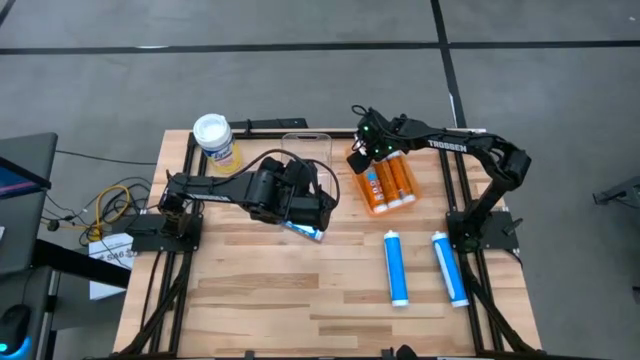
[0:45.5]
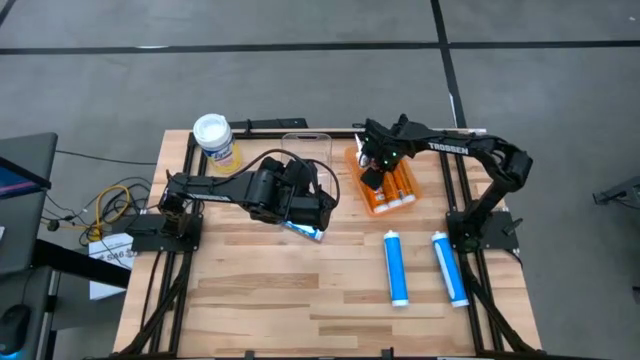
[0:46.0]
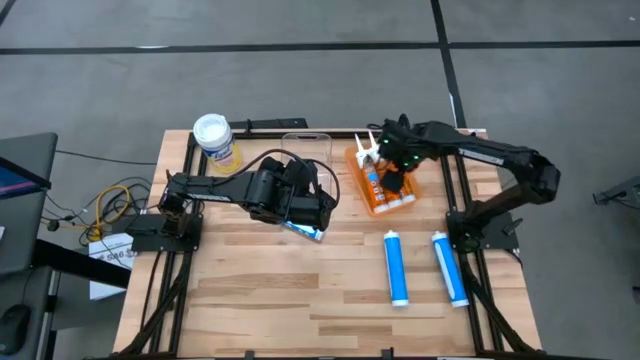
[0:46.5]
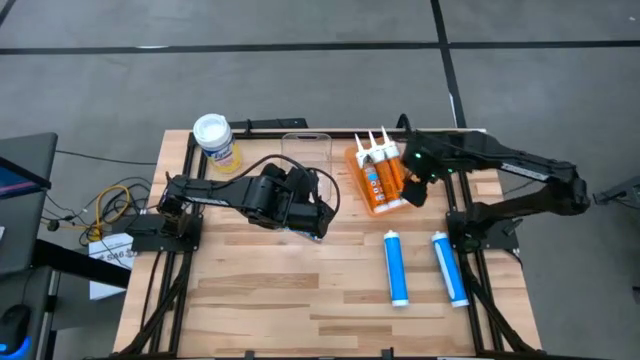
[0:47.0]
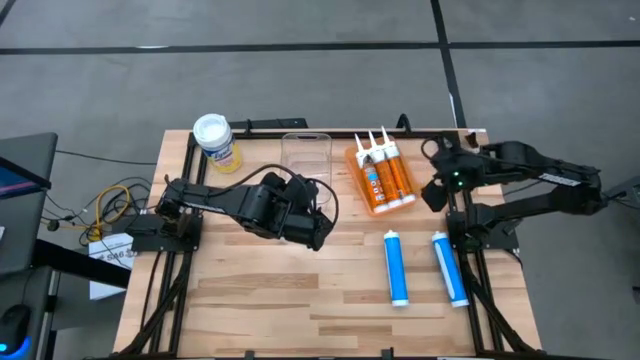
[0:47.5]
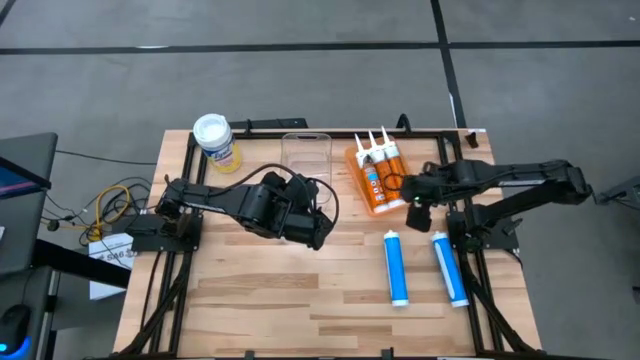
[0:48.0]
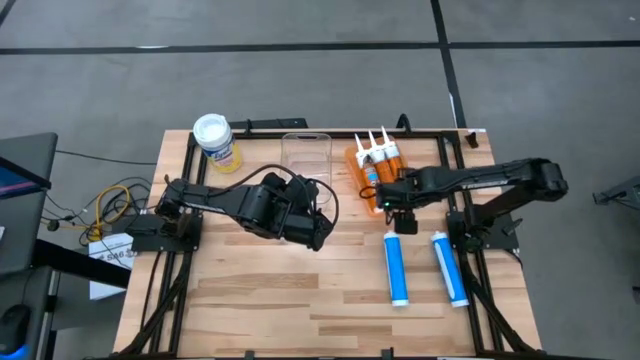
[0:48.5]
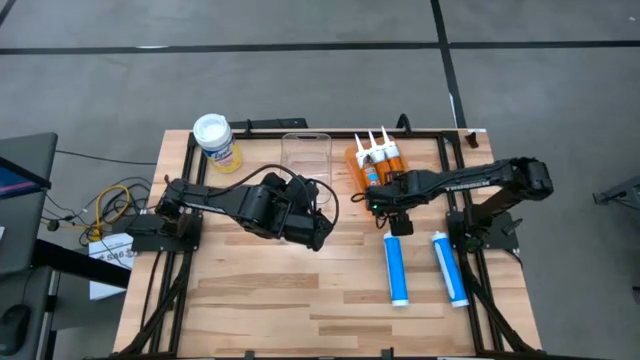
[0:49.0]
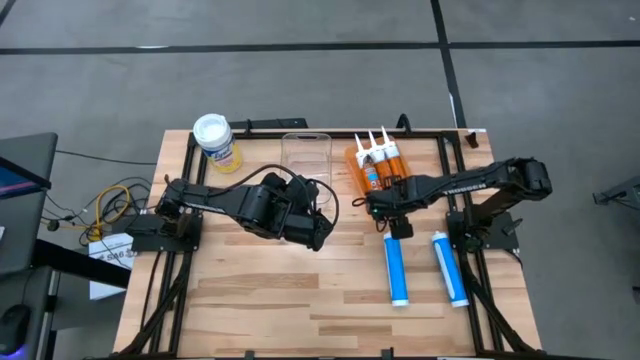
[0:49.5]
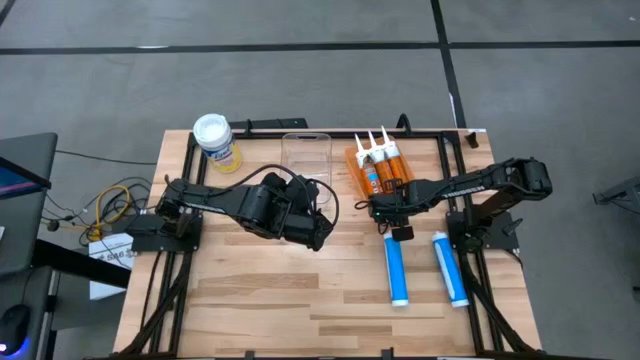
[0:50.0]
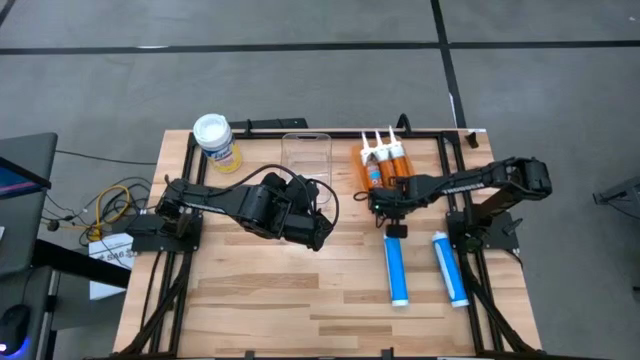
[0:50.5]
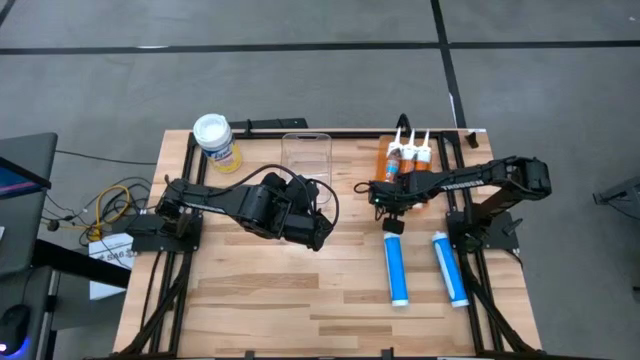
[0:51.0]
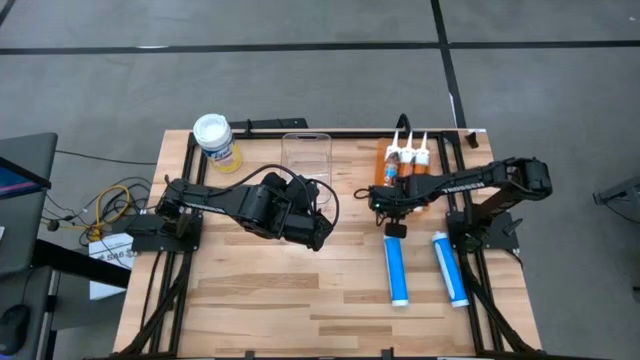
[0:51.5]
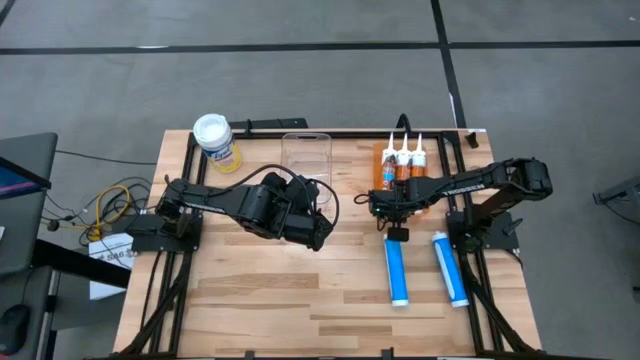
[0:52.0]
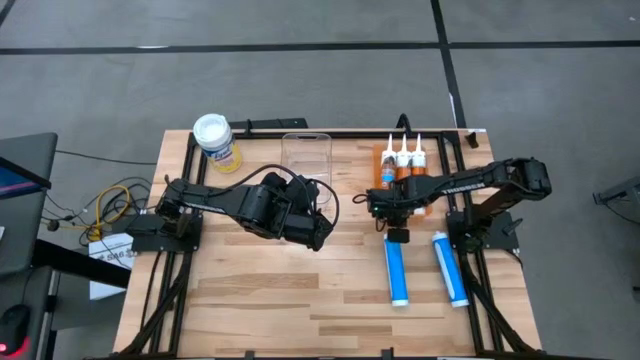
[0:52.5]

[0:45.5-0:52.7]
Task: Pick & place silicon tubes, Sealant and Lysol wipes
Adjust the orange bin

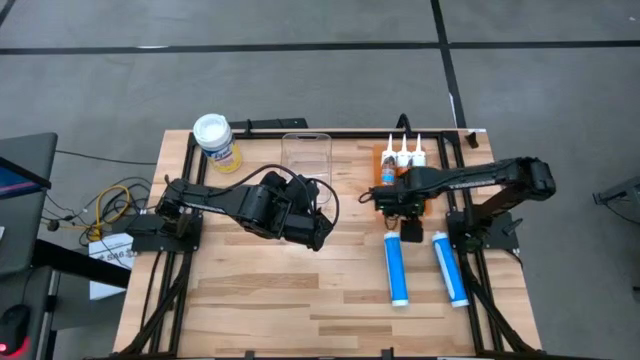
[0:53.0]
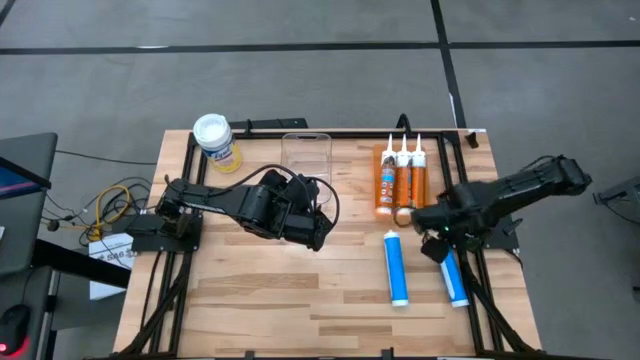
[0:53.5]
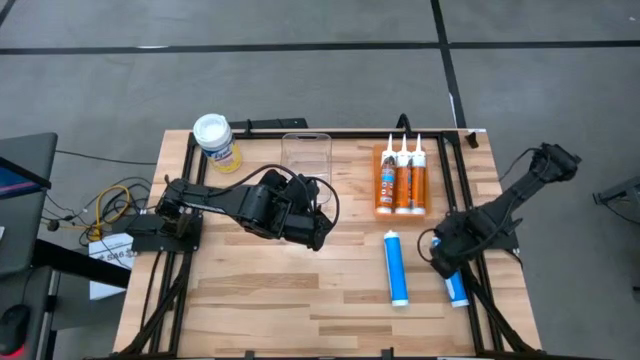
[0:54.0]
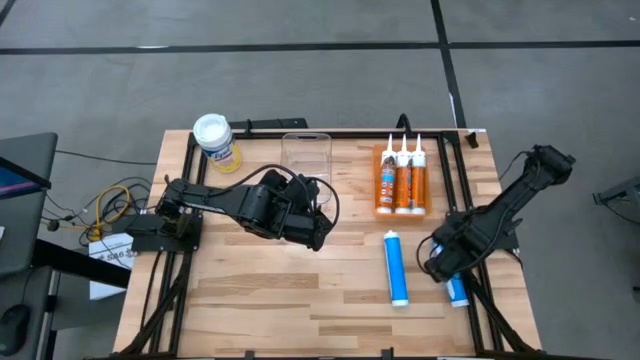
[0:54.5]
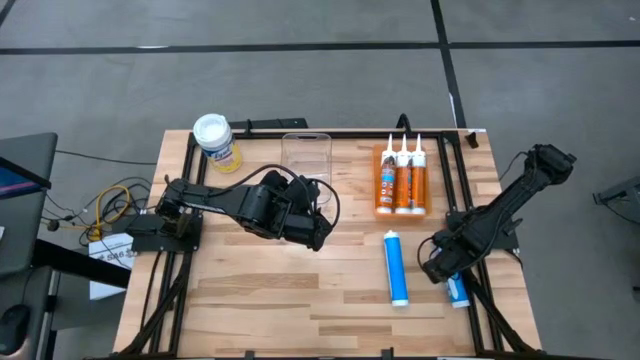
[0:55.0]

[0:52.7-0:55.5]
Put the right blue sealant into the transparent bin

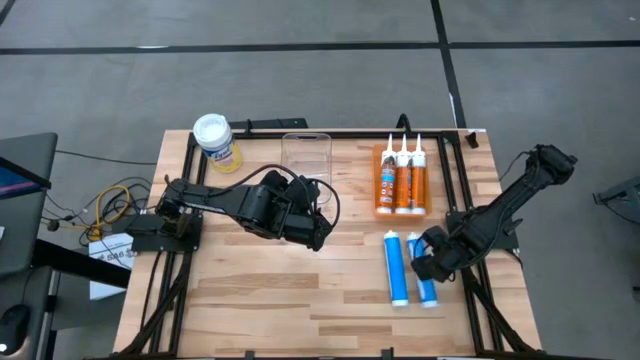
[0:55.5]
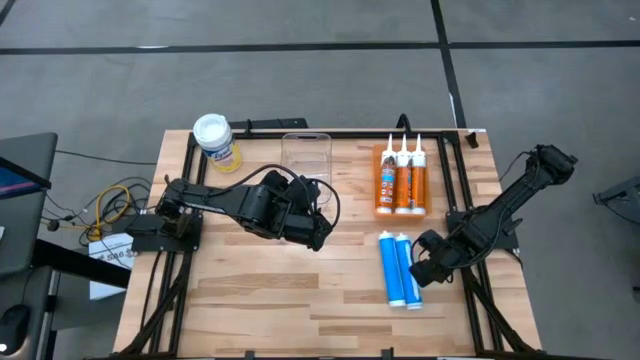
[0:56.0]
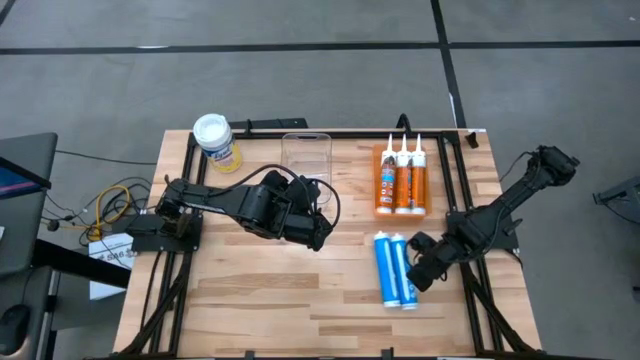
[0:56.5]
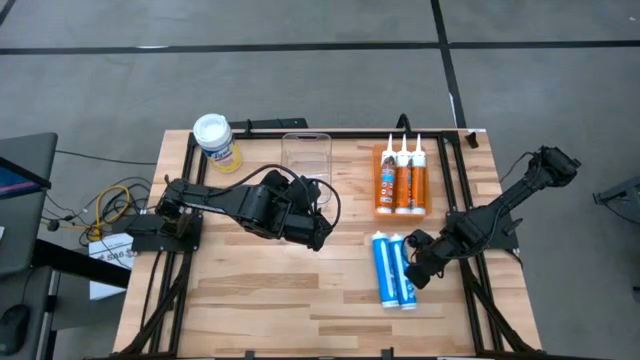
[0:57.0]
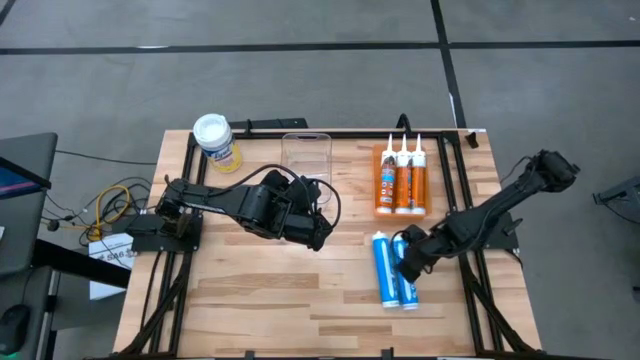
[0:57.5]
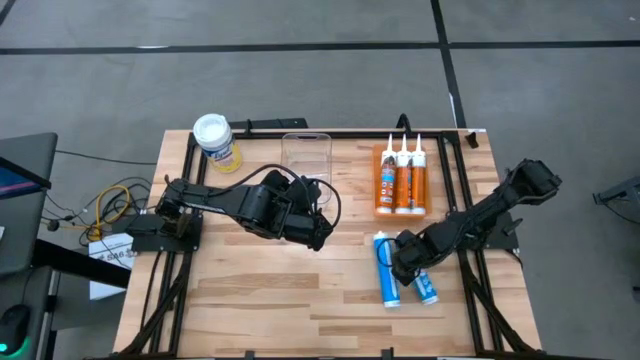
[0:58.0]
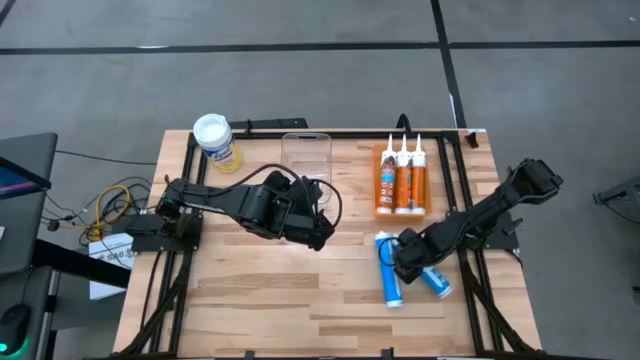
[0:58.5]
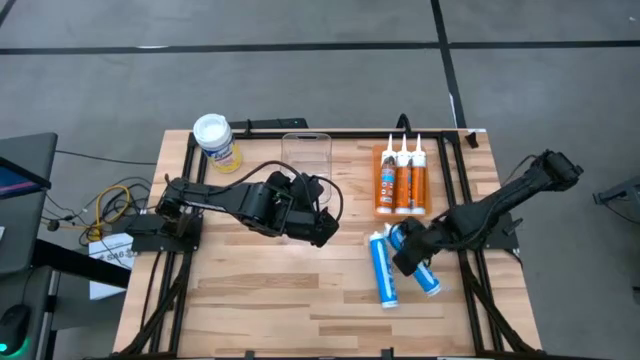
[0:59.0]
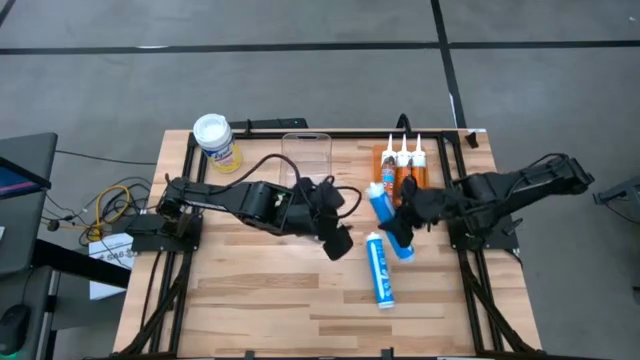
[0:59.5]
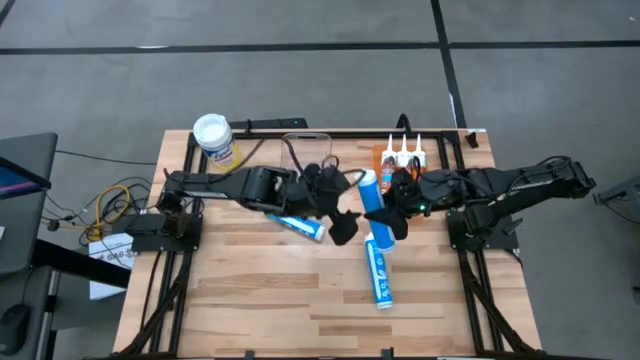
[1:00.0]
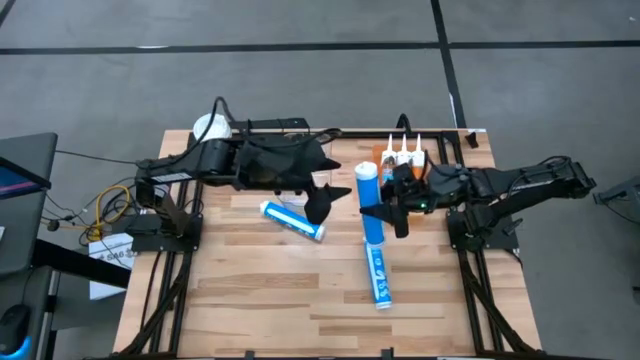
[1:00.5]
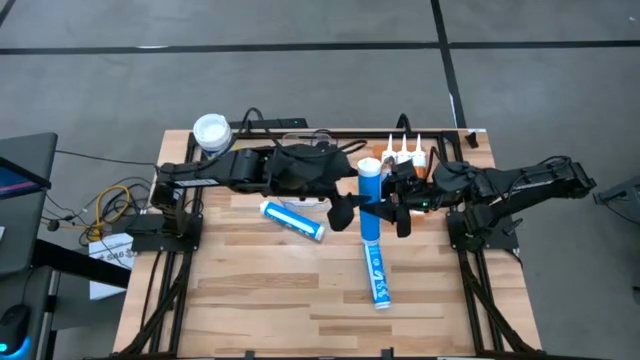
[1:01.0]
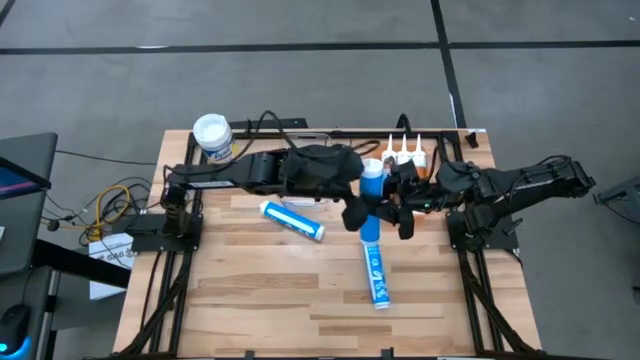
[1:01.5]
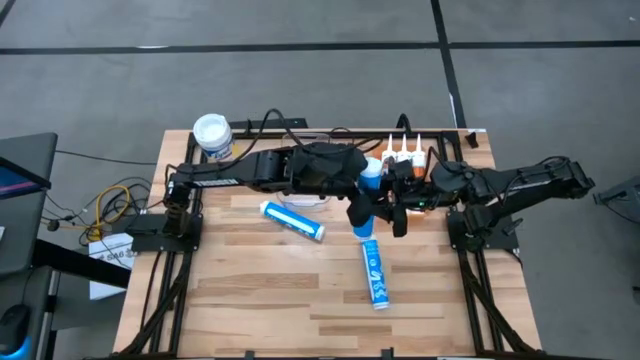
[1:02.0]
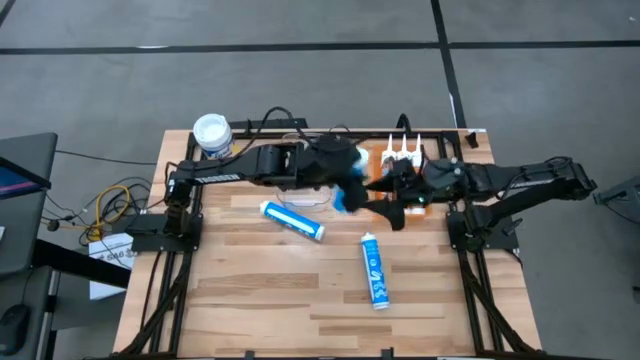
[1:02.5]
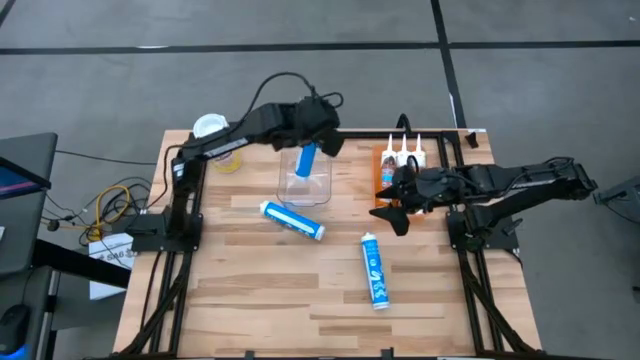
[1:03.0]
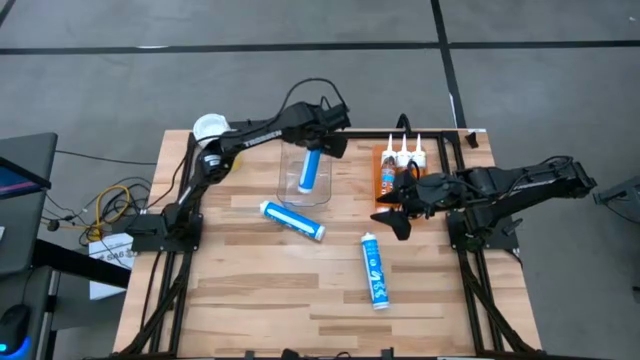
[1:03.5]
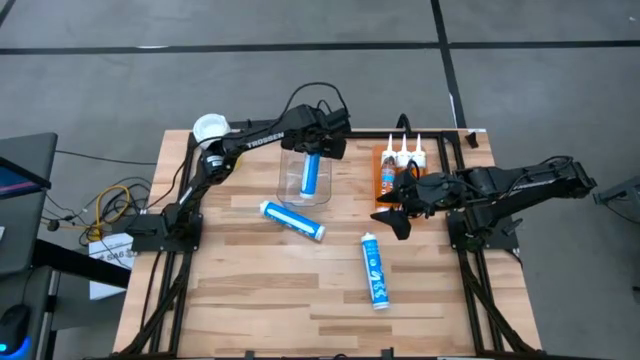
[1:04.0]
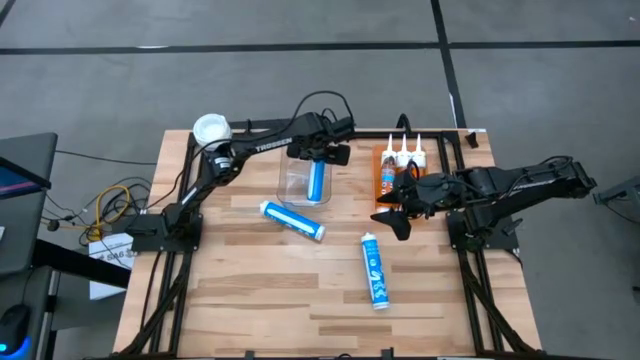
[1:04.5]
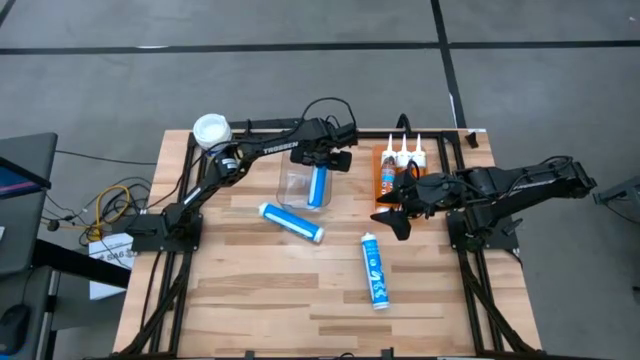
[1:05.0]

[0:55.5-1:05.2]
Put the bottom right blue sealant into the transparent bin

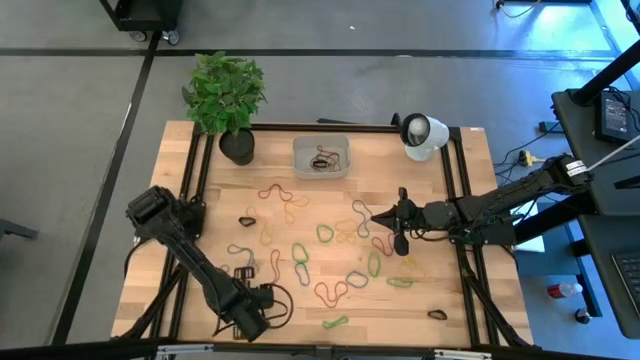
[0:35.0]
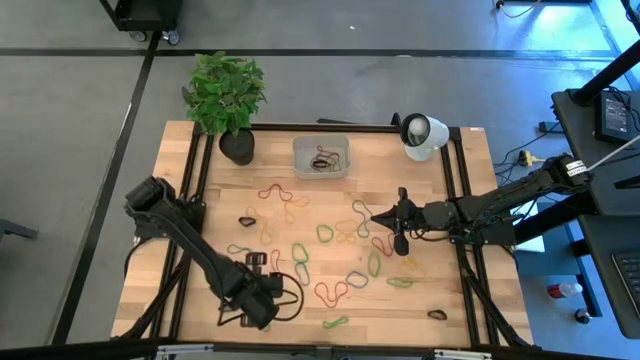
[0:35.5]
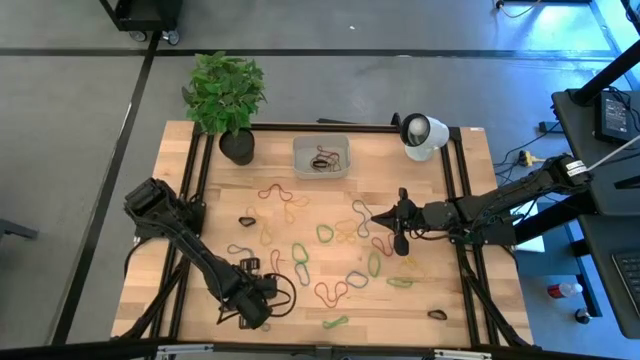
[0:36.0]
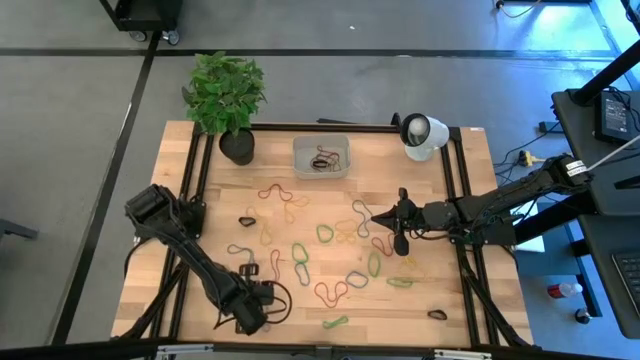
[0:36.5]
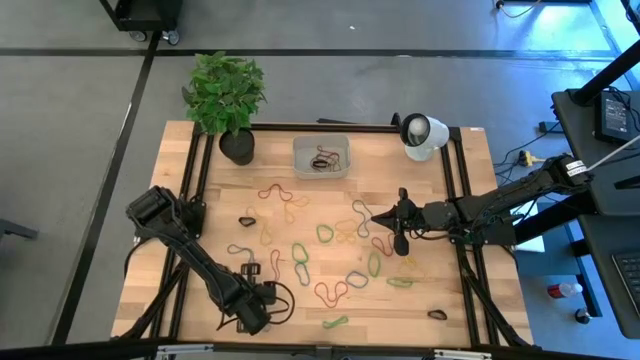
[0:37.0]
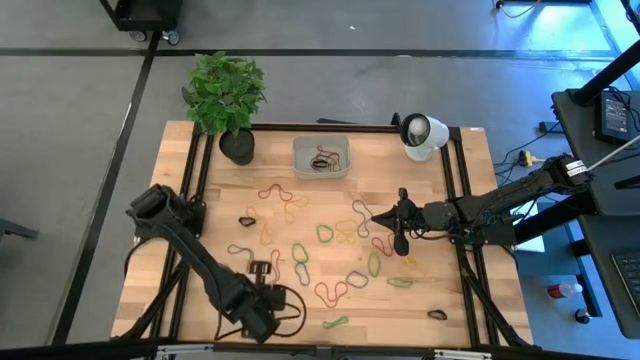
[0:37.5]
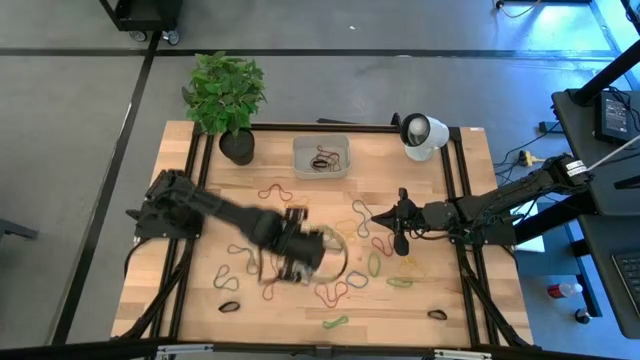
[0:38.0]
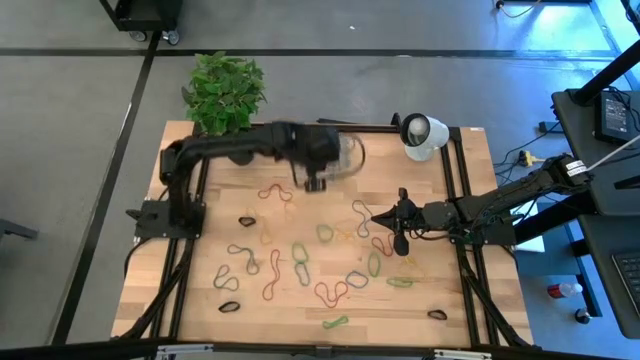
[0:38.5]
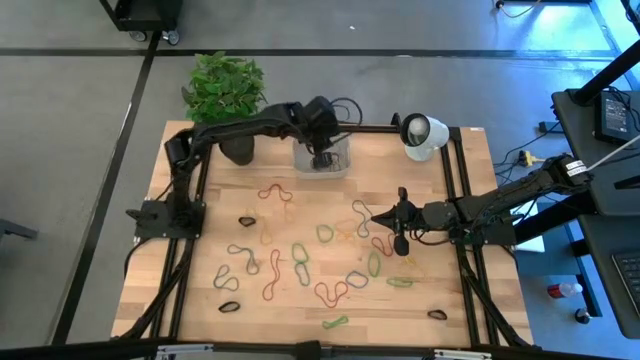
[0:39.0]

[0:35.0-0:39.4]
Task: Pick and place rubber bands into bin
Put the blue rubber band into the gray bin
